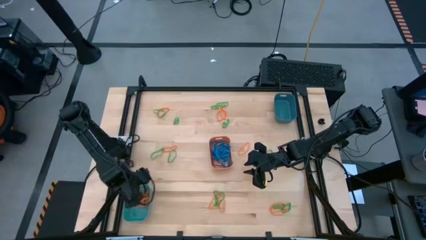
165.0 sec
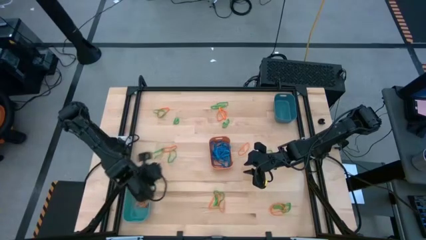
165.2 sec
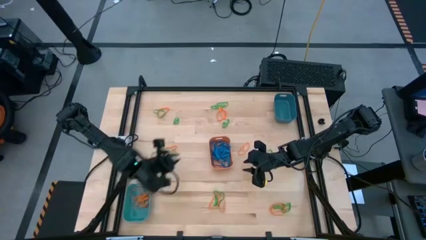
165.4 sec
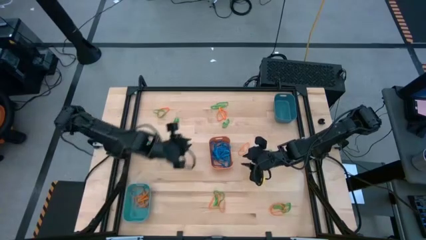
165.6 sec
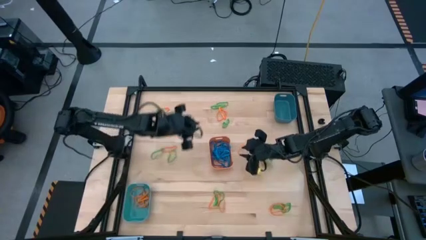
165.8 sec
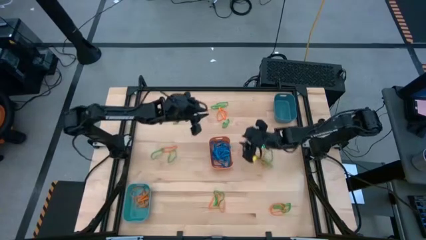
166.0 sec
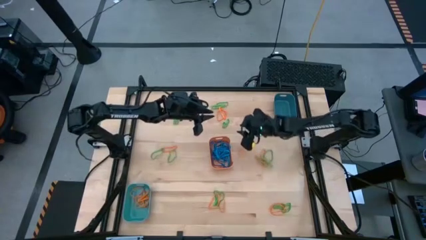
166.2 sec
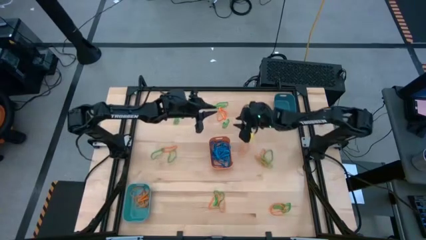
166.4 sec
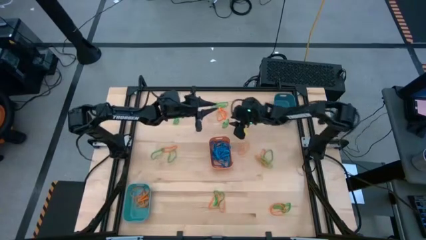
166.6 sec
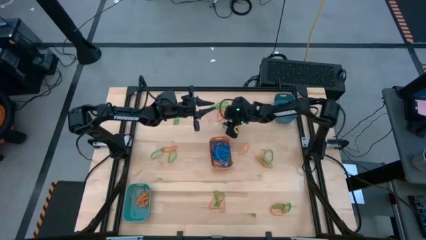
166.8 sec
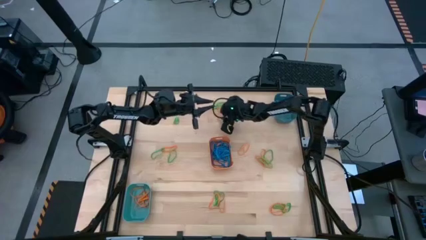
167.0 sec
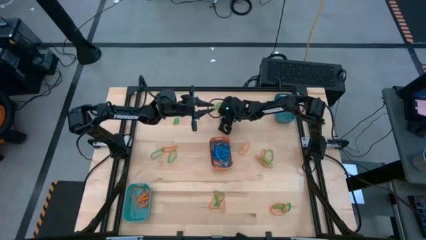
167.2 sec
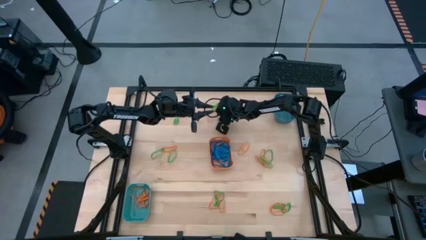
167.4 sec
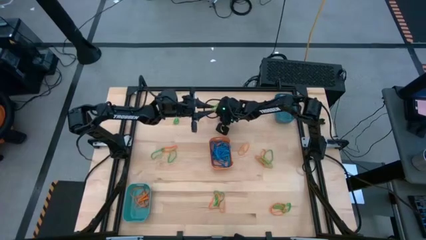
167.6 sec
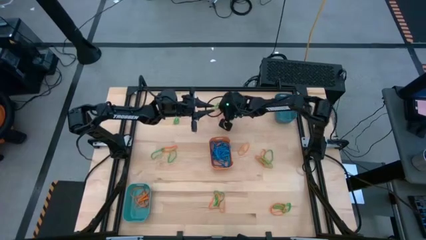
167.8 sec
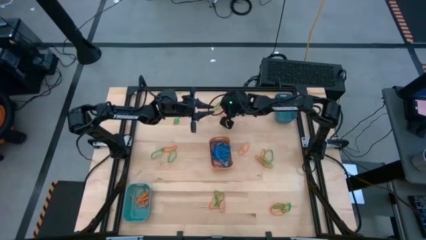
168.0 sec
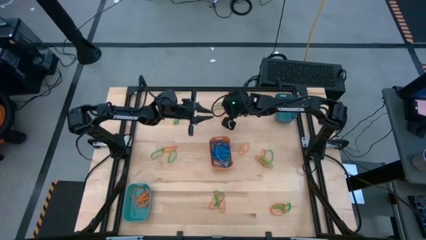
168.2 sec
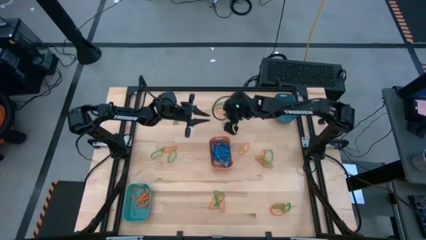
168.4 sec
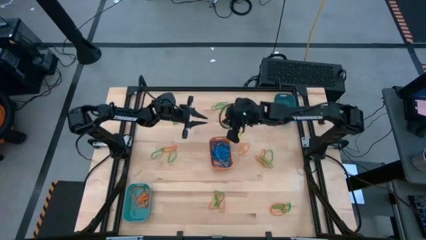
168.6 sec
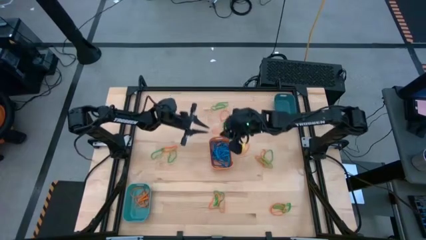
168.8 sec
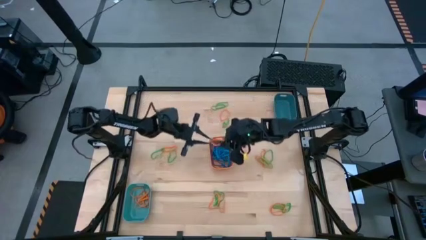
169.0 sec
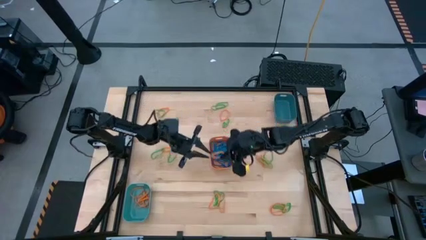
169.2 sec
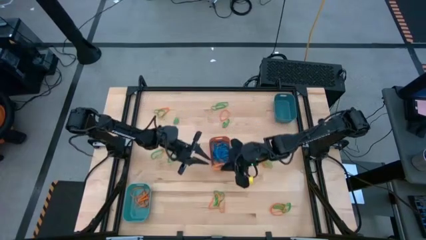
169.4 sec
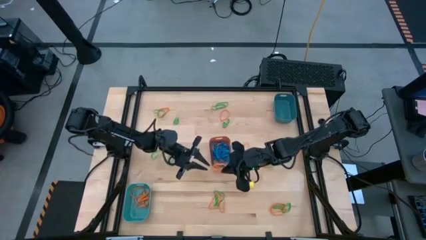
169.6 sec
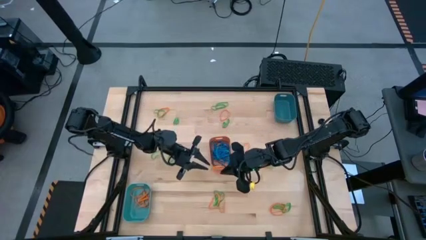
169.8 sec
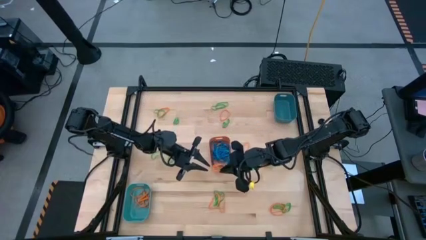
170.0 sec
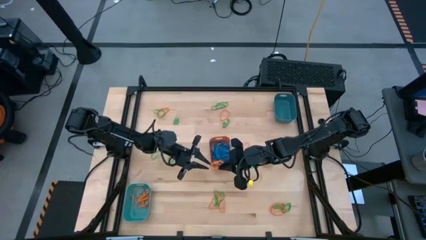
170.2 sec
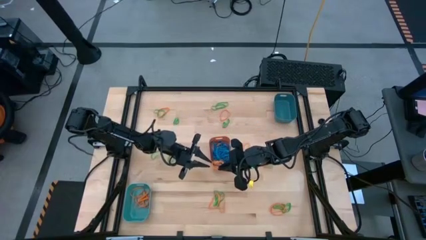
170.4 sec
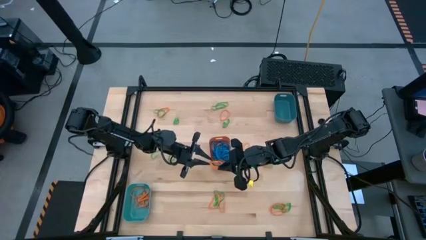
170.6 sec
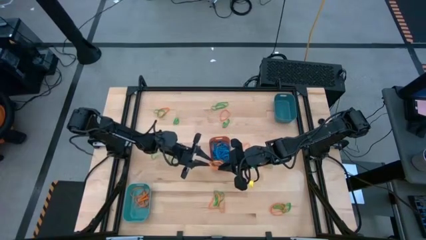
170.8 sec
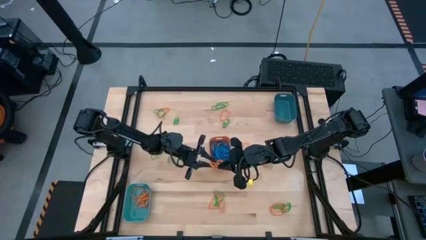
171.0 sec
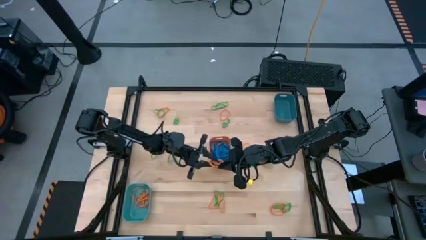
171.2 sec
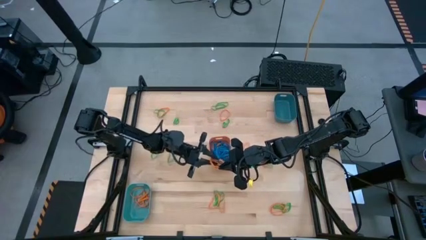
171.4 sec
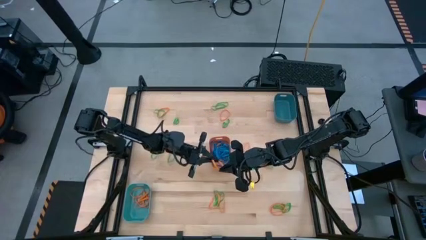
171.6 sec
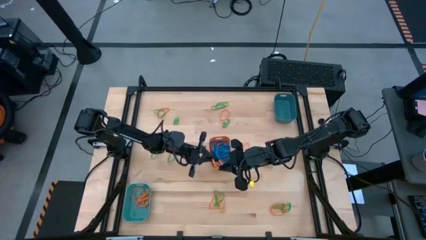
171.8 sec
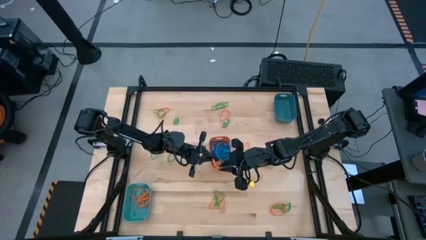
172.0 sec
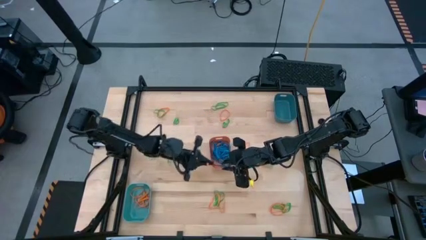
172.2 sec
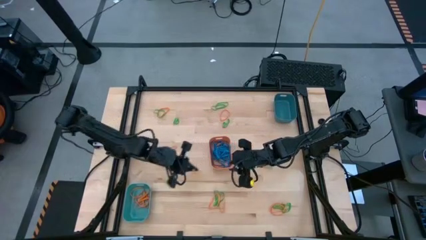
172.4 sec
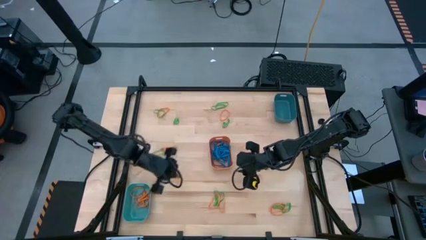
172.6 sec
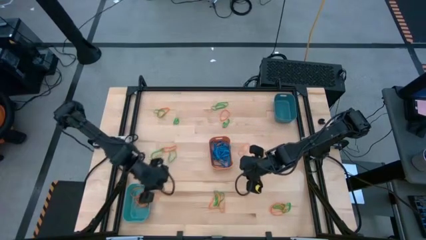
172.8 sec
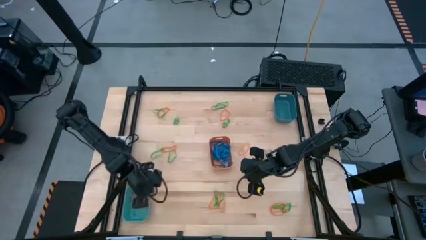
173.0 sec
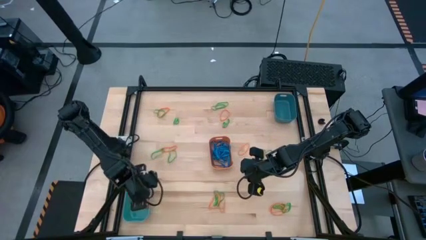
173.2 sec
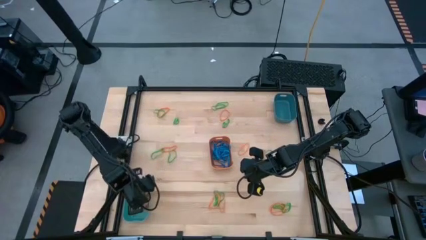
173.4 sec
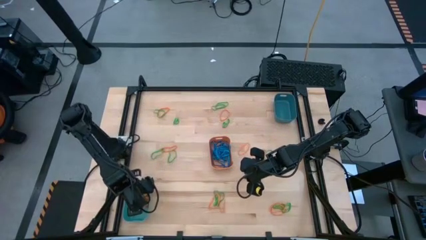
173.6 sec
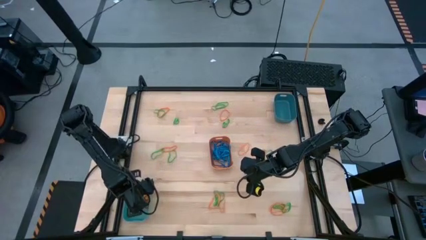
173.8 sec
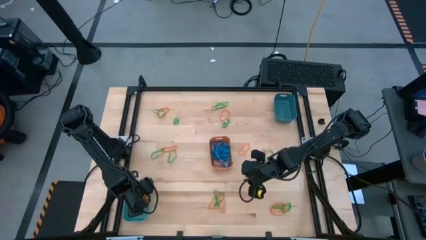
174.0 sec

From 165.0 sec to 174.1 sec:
Task: Sort rubber bands into baskets
Put the orange rubber band into the green bin

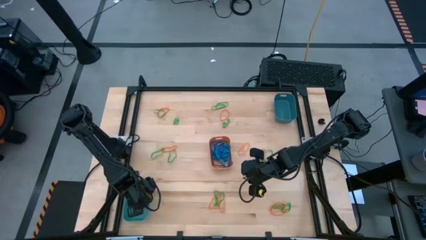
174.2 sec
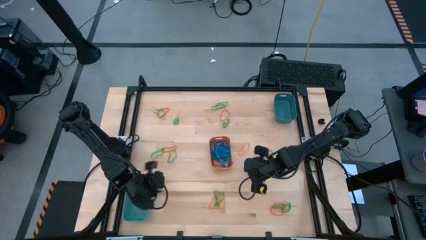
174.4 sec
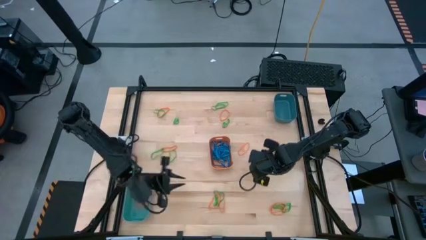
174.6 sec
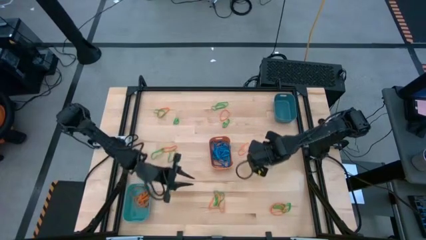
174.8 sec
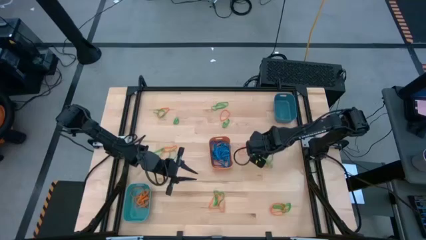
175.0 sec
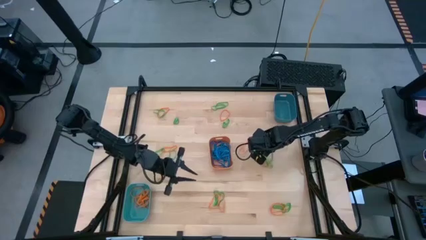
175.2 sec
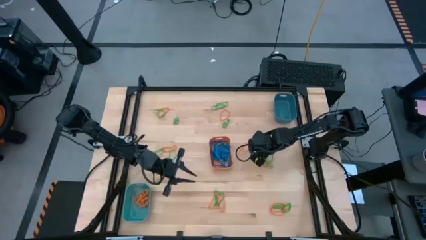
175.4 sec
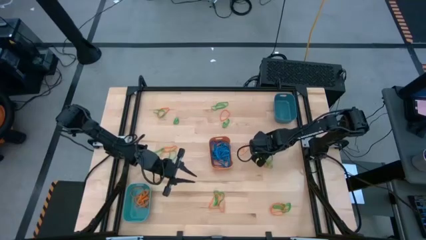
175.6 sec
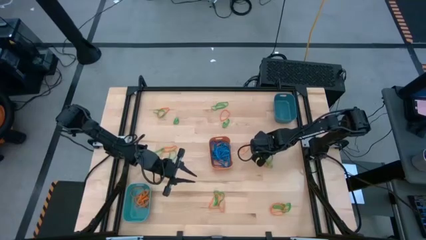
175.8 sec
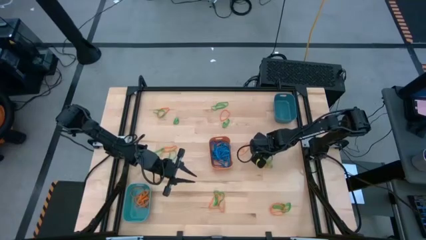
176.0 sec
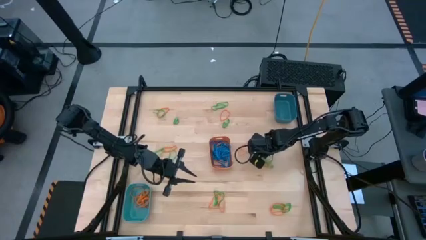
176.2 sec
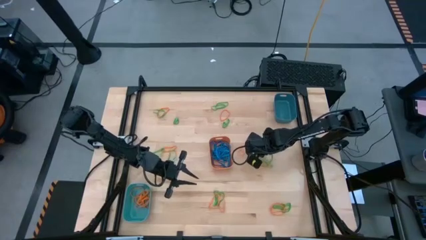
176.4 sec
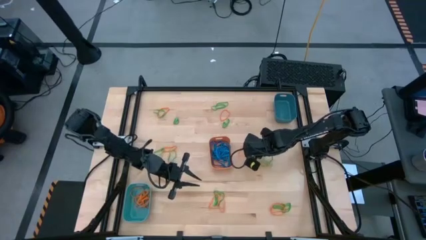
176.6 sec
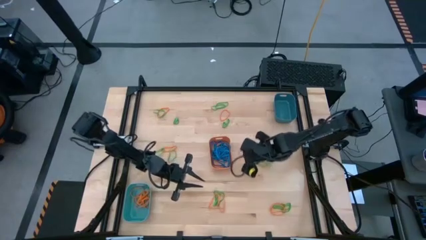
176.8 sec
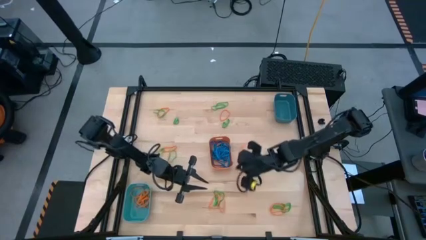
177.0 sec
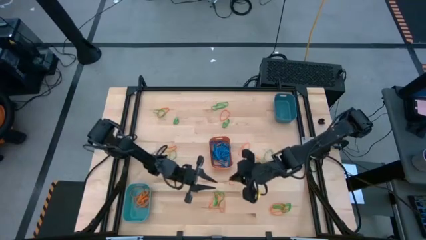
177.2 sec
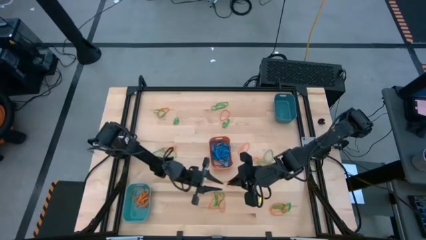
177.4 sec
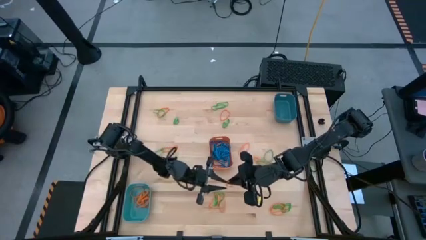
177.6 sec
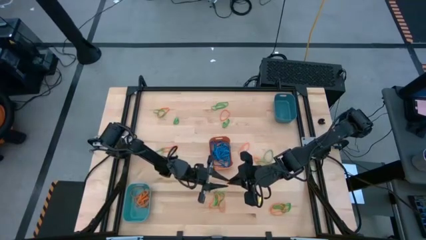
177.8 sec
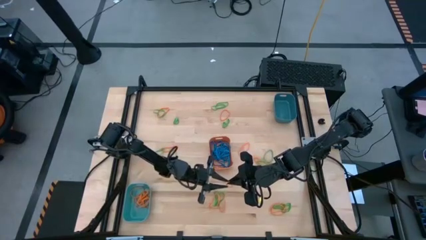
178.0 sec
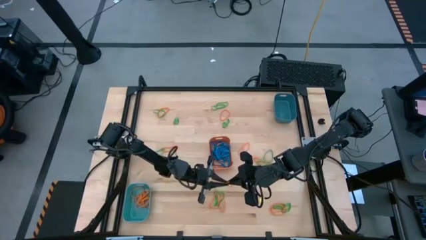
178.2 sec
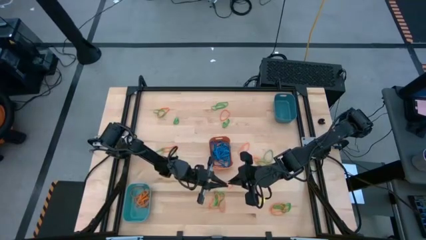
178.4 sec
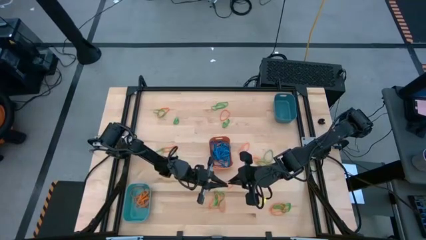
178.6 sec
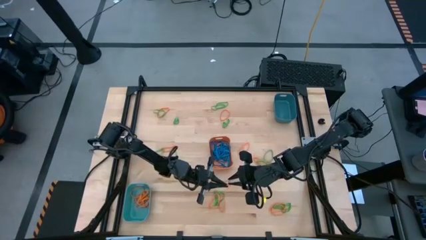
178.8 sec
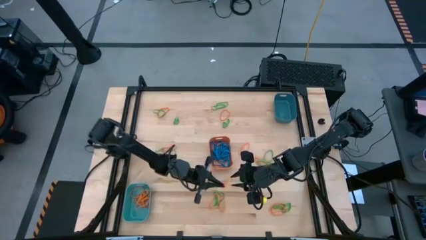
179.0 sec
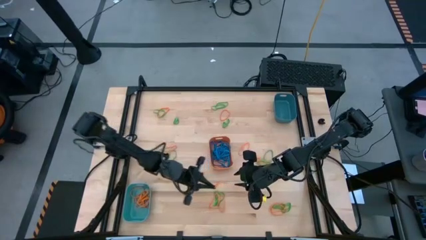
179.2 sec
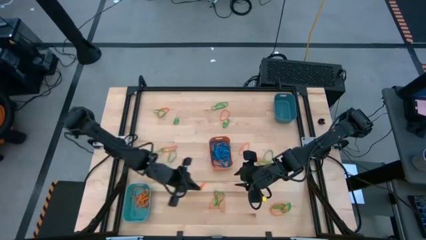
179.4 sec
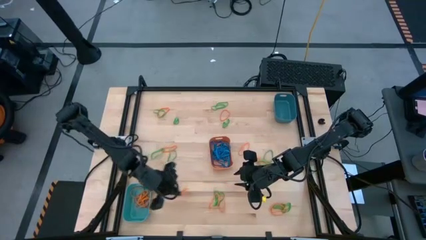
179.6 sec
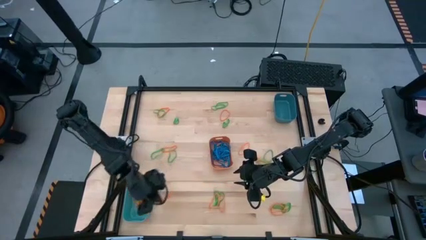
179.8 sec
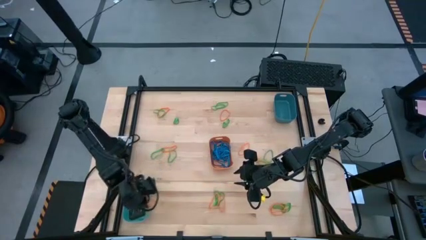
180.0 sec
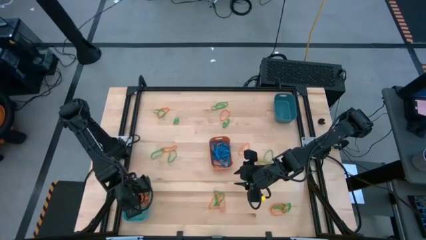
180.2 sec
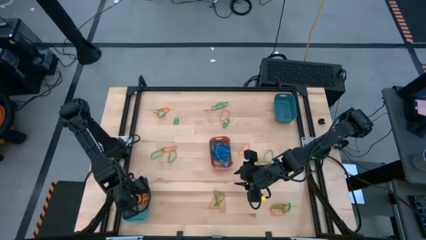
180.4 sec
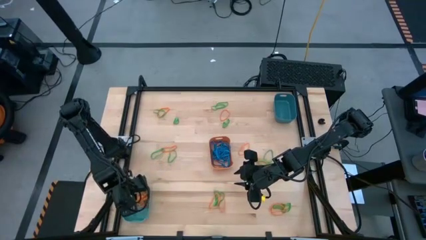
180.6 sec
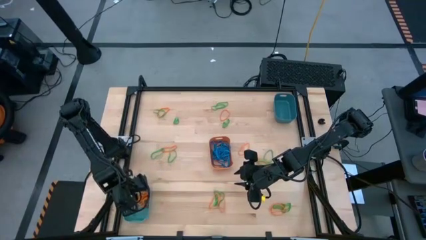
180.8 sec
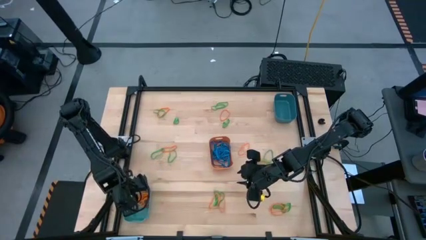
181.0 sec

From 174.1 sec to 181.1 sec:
Put the orange rubber band into the green bin
